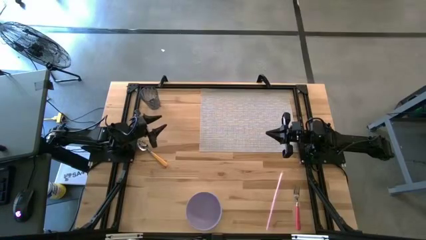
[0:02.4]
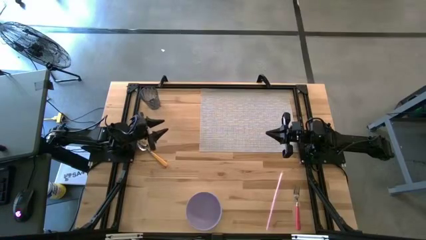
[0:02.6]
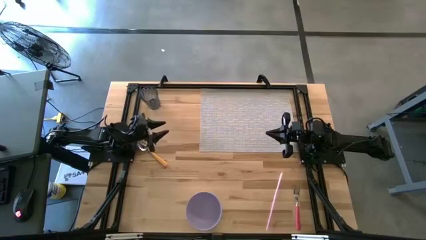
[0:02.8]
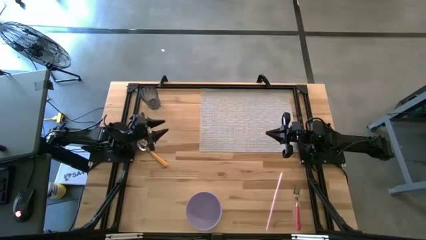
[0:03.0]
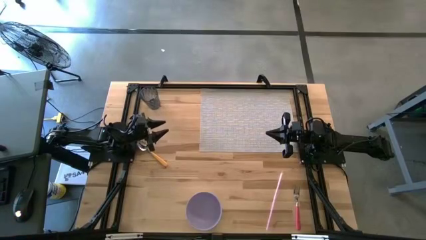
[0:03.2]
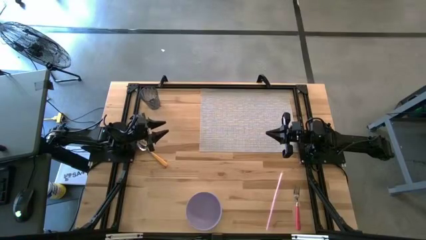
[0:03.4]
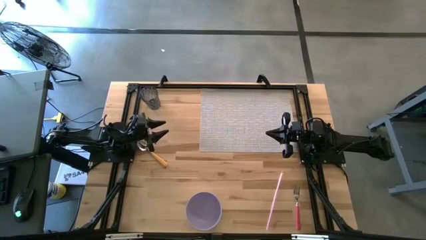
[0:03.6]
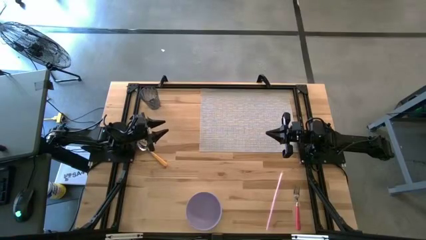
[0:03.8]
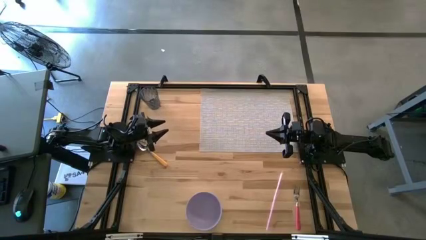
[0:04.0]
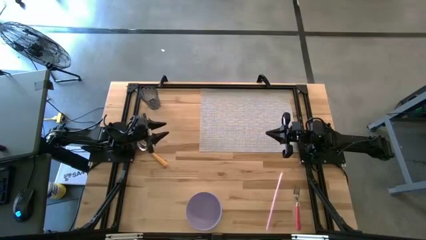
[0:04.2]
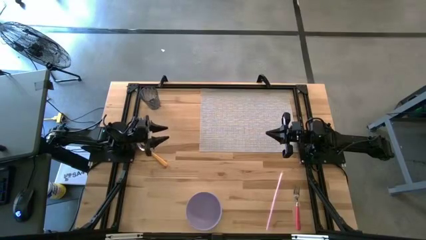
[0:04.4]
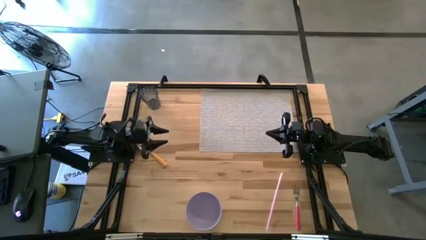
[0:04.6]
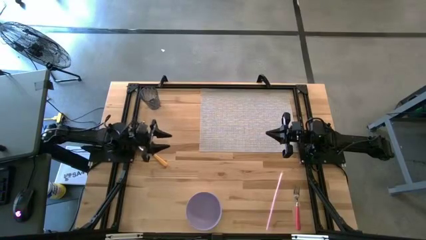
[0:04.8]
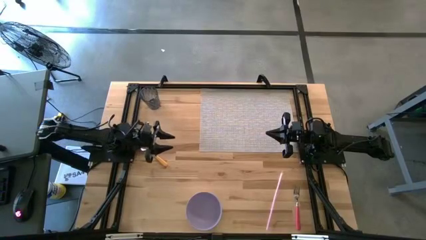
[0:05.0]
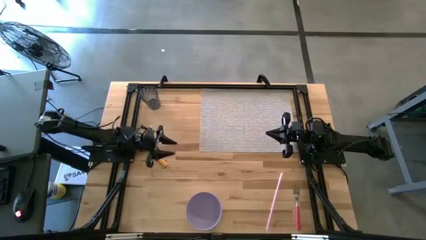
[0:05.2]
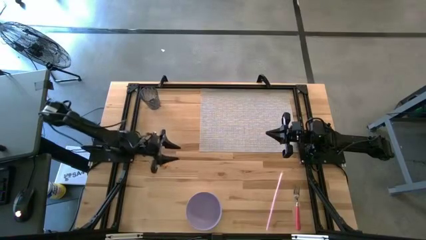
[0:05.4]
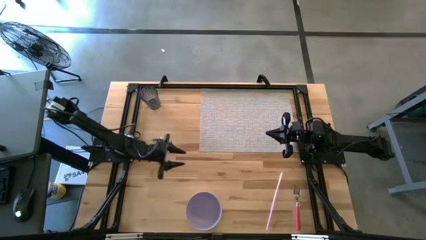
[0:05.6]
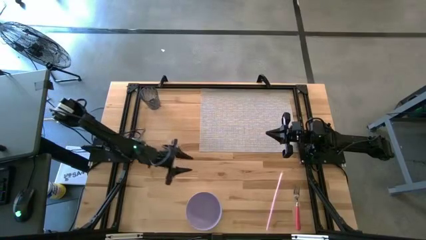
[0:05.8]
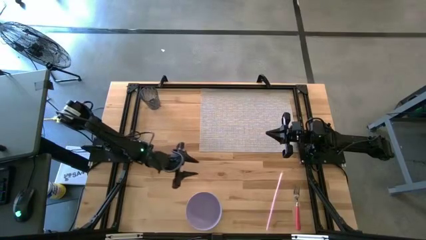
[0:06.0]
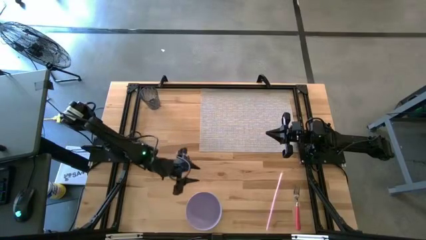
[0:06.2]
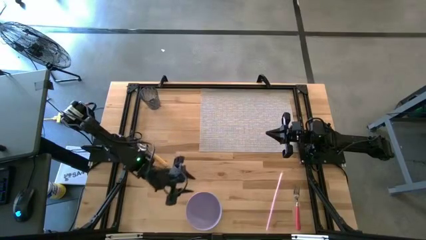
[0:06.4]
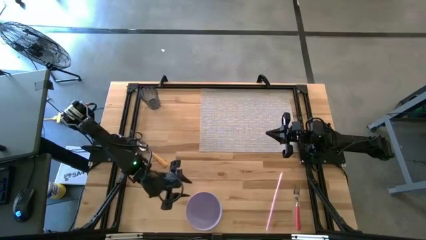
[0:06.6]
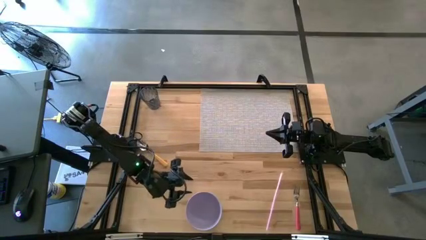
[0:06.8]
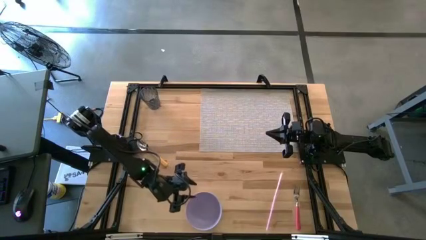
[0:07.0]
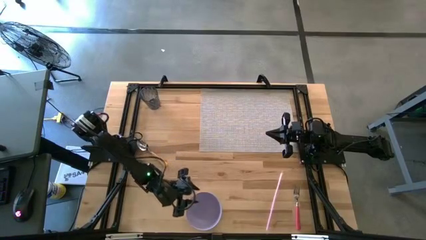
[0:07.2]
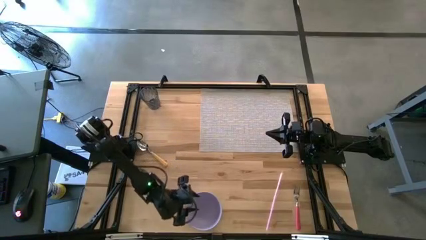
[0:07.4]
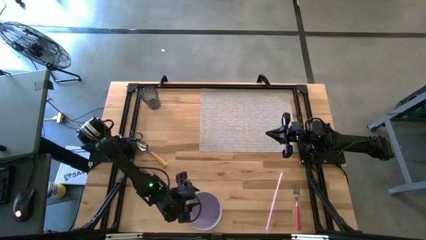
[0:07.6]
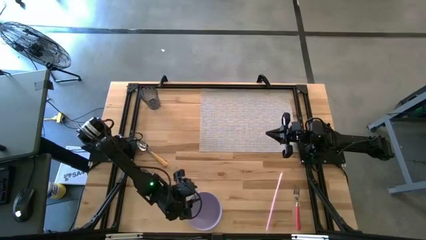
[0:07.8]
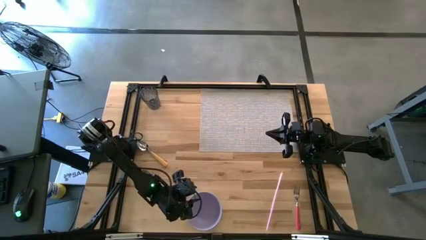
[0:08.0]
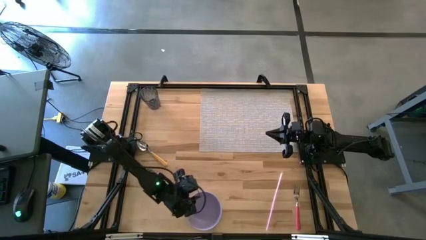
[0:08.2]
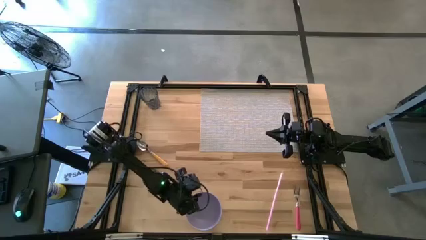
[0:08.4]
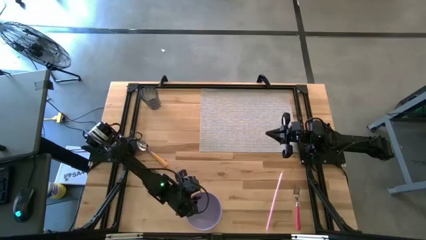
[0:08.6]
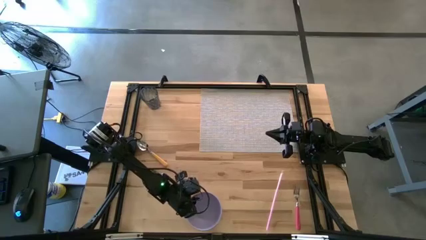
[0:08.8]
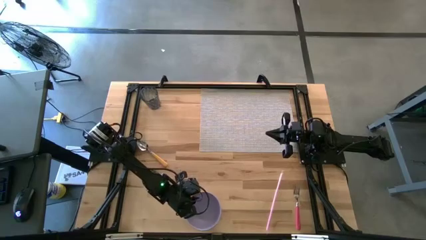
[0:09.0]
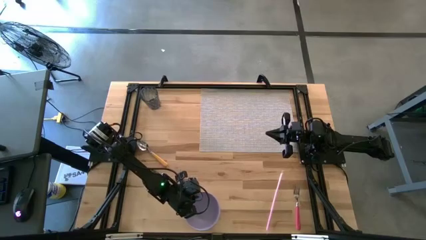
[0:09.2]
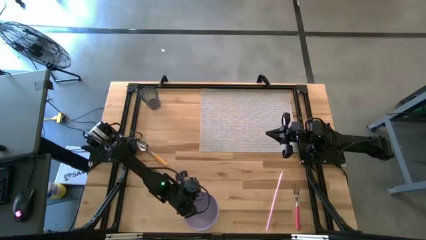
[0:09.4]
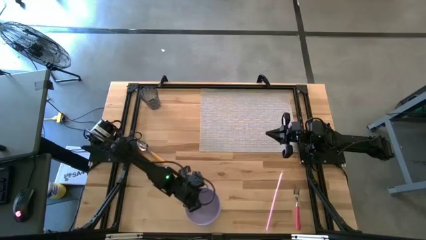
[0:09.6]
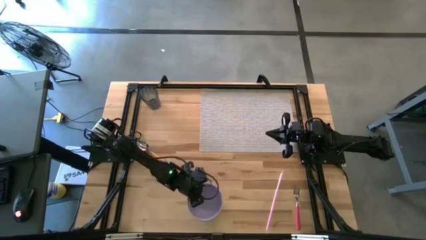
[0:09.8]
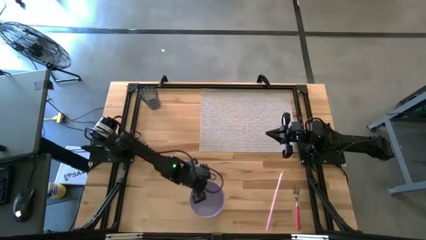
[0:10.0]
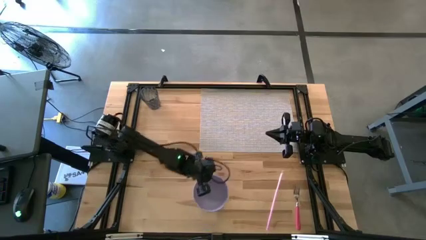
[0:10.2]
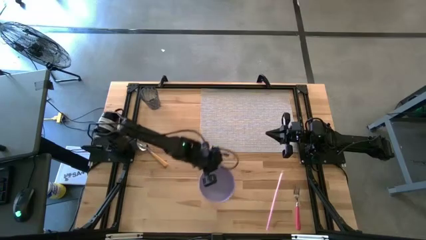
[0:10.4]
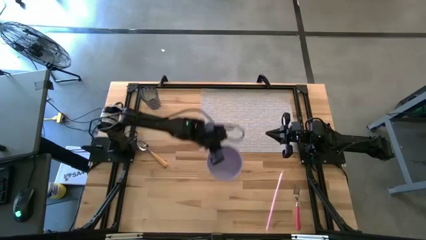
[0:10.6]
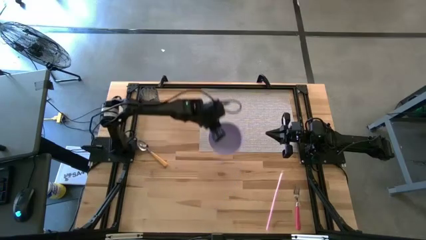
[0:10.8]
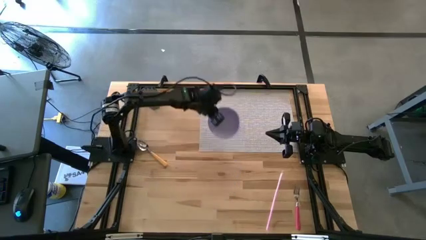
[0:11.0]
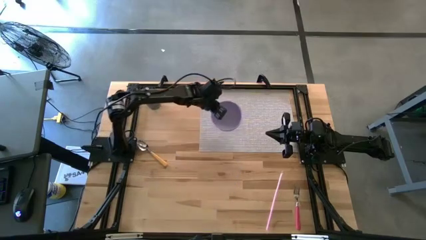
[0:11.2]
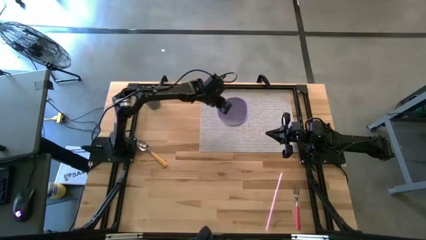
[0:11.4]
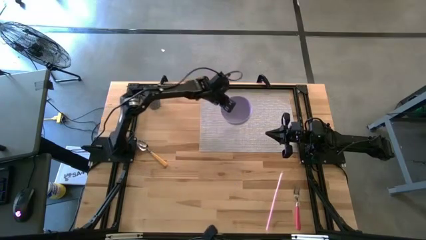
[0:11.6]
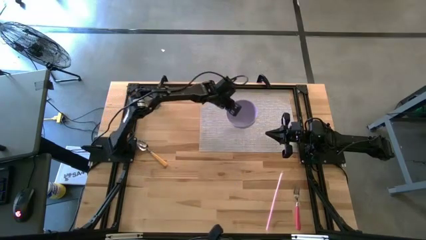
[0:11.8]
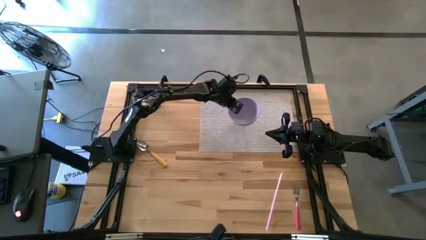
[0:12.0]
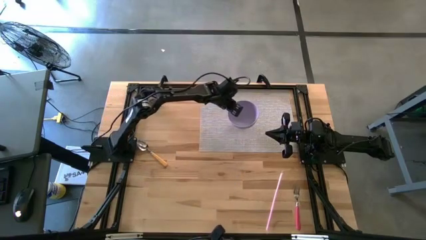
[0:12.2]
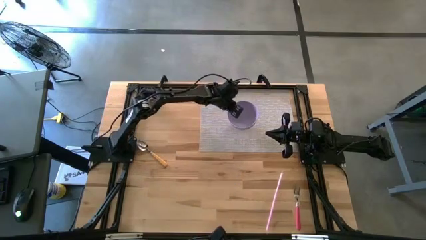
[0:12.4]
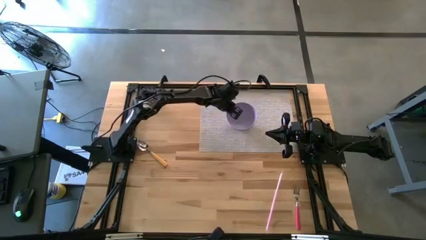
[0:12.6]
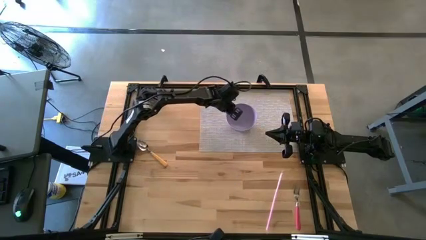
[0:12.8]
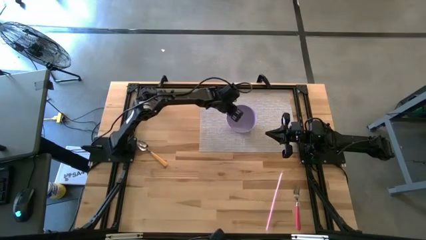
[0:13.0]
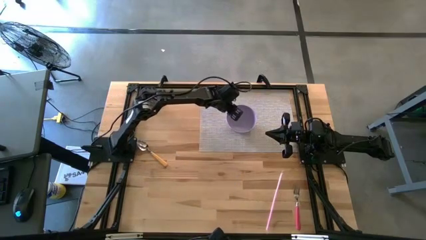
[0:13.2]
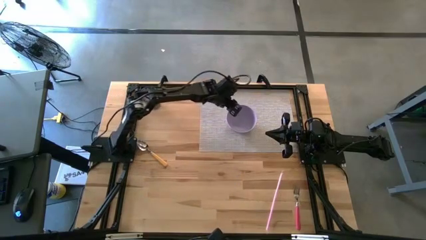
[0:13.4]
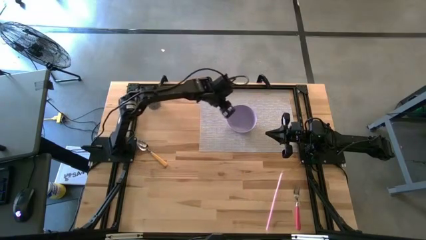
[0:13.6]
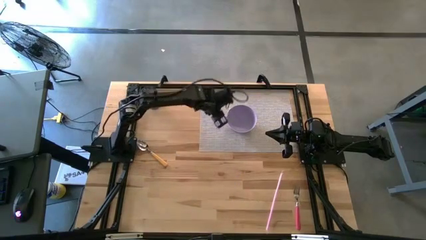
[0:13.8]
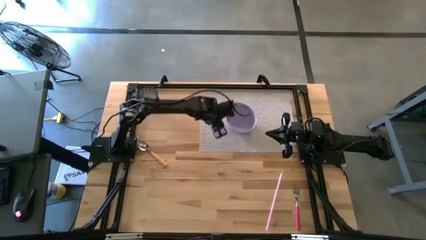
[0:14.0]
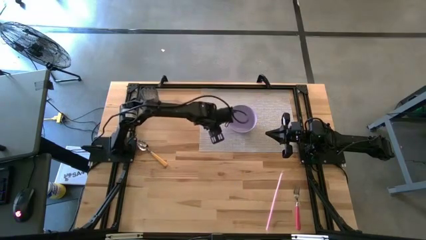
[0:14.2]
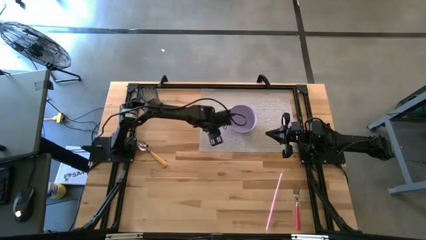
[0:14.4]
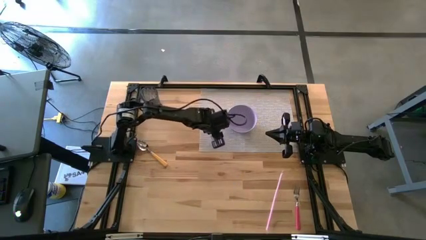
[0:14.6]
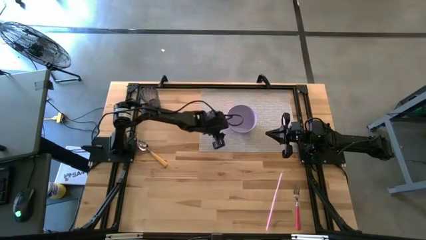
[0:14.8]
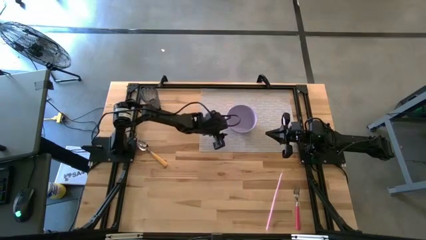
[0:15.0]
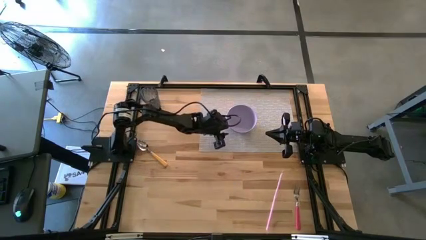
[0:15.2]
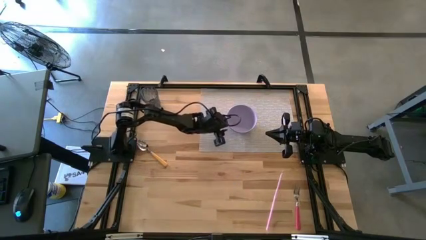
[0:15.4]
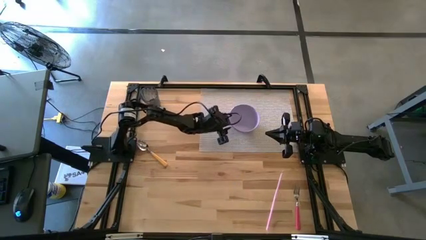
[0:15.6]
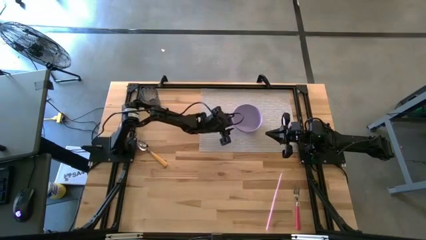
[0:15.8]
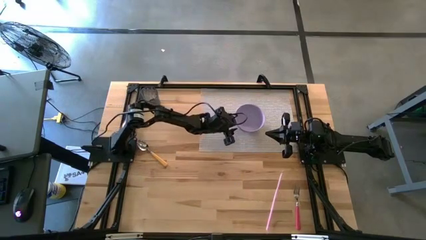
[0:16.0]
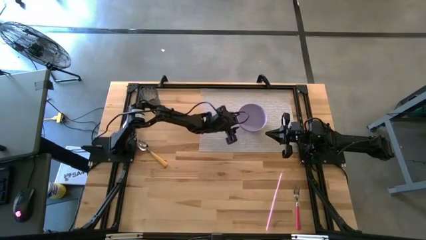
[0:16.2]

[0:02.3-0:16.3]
Task: Pick & Place Utensil
Put the purple bowl on the center of the gray table mat
